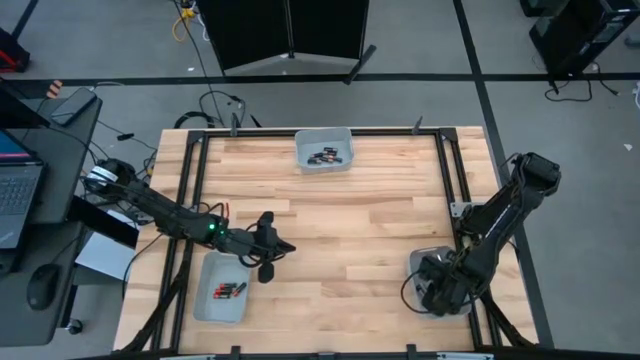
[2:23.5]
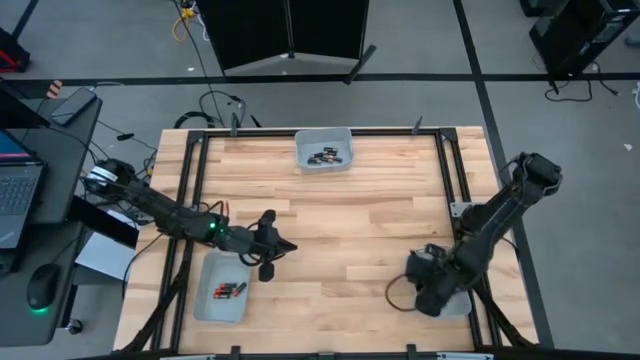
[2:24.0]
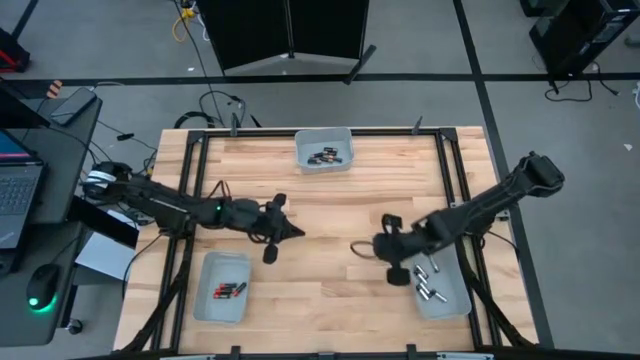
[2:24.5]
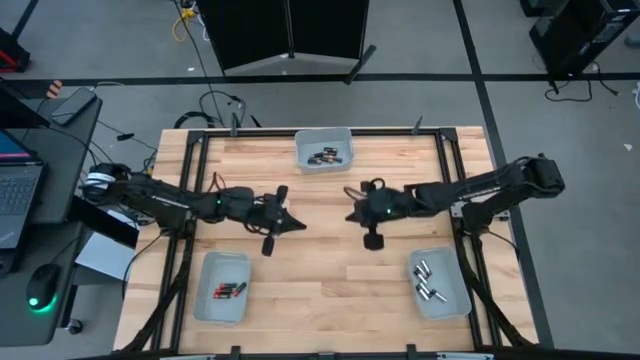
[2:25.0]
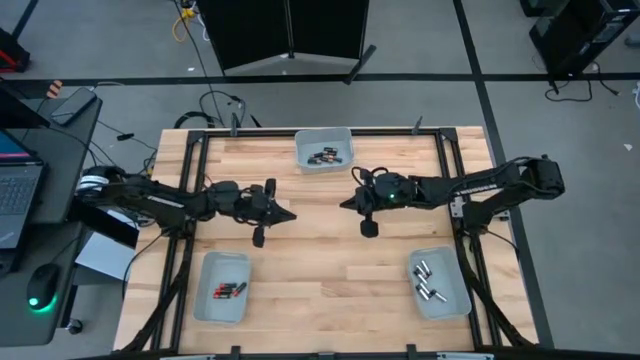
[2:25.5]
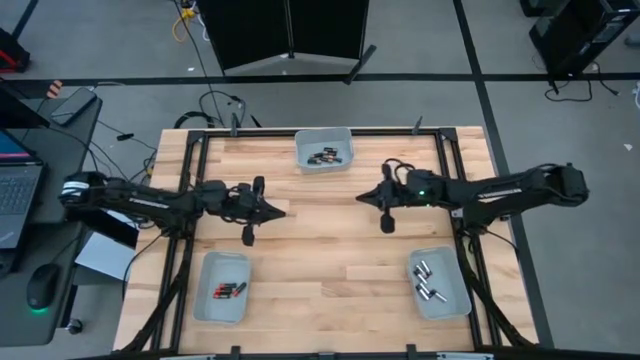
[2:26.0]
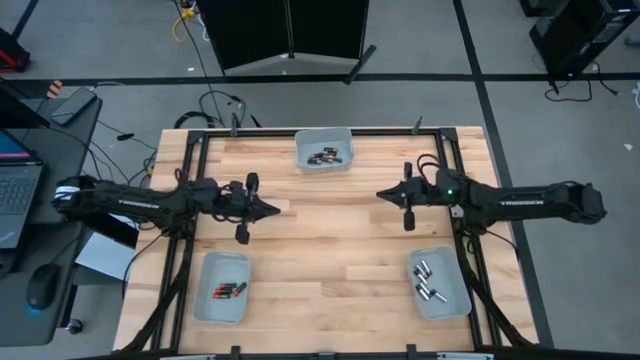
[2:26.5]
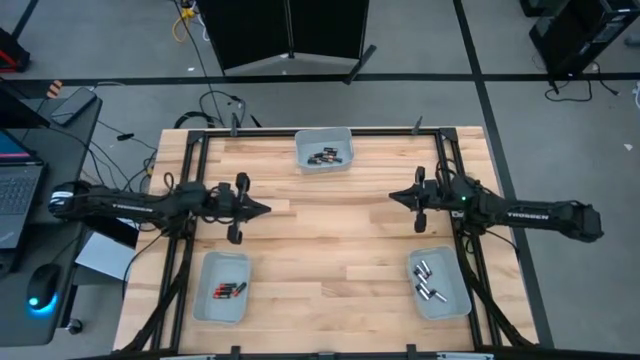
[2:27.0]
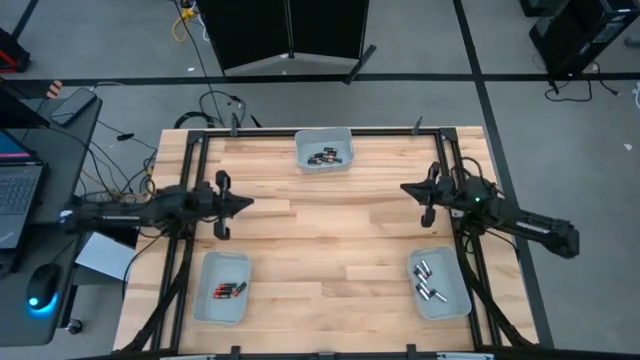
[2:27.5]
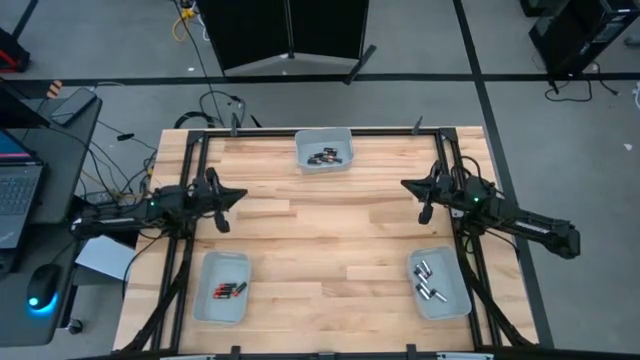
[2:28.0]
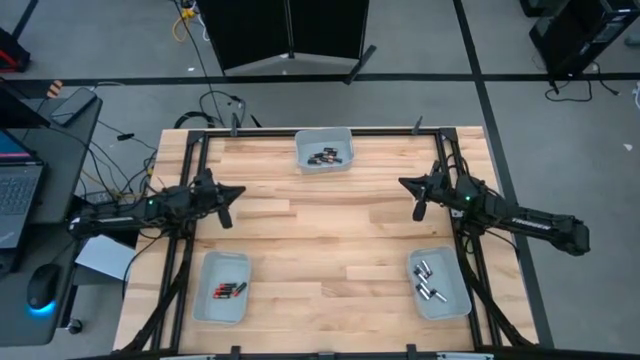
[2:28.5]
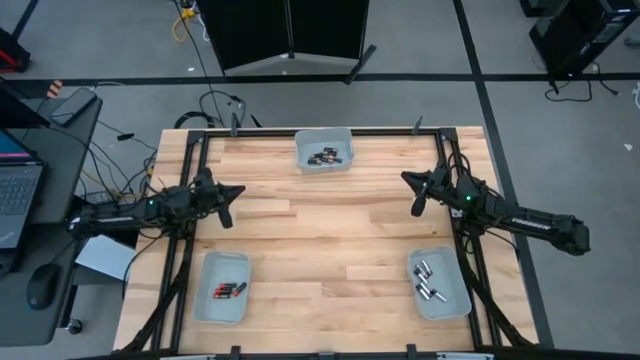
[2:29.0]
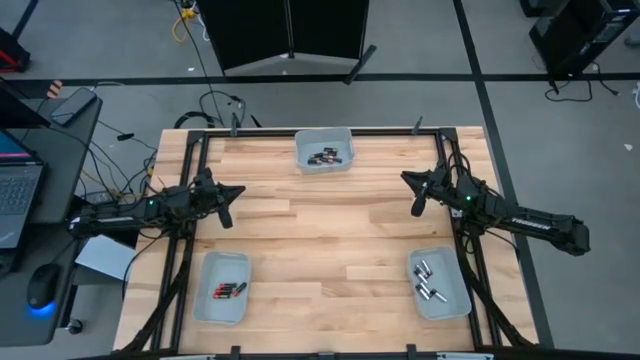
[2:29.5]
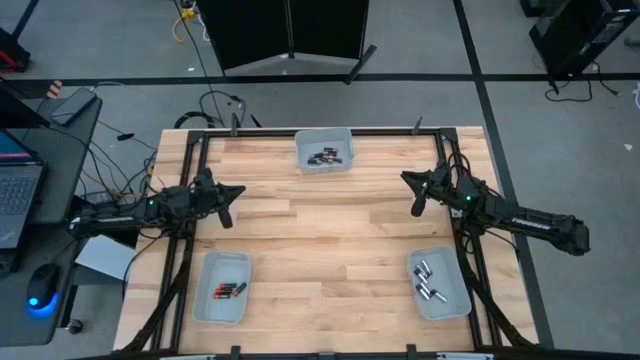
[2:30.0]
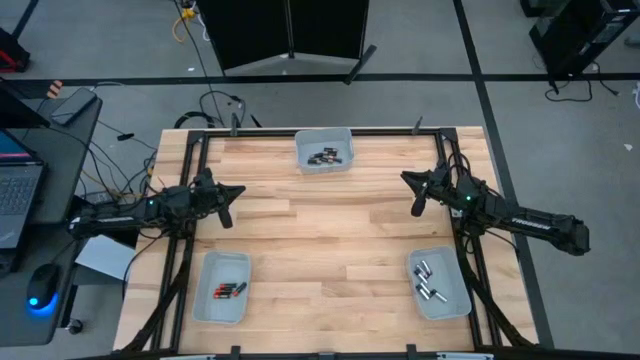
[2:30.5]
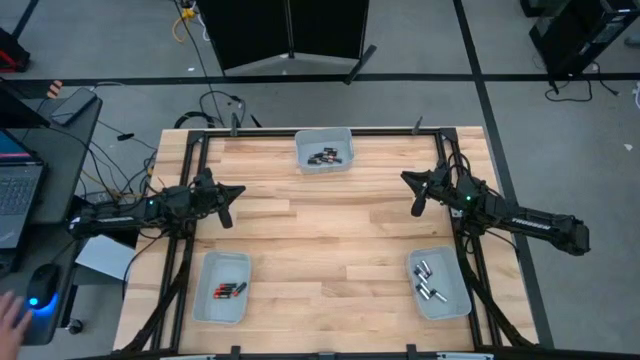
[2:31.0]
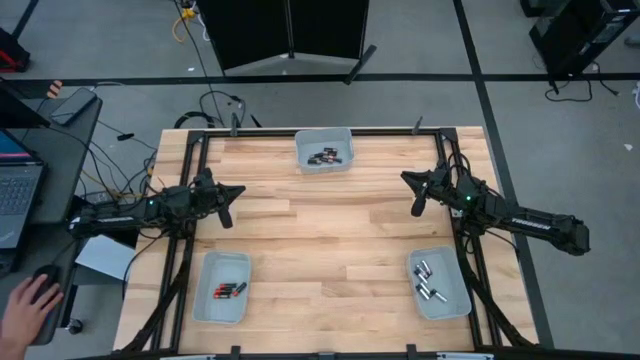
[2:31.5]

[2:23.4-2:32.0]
Task: Sort batteries
Return to Home Position

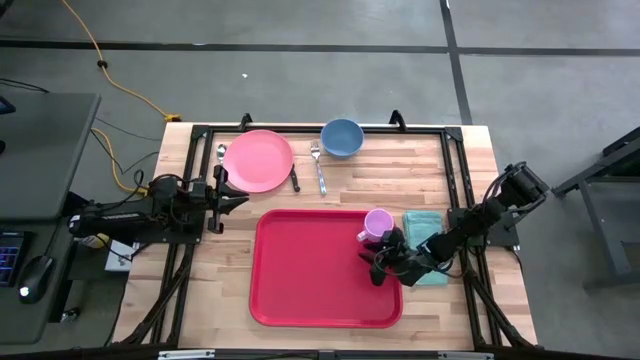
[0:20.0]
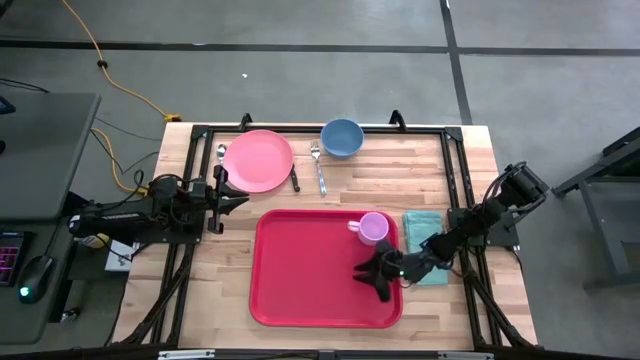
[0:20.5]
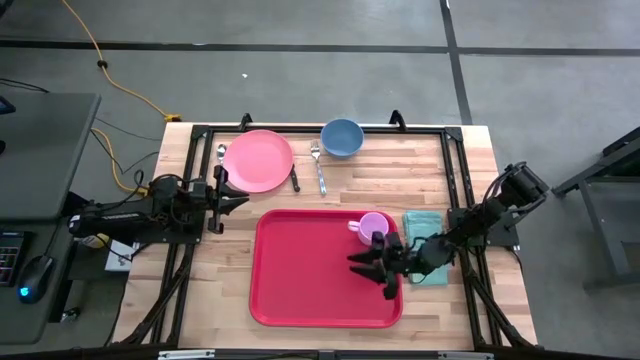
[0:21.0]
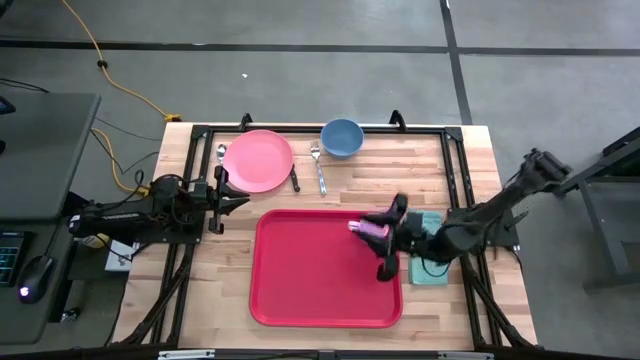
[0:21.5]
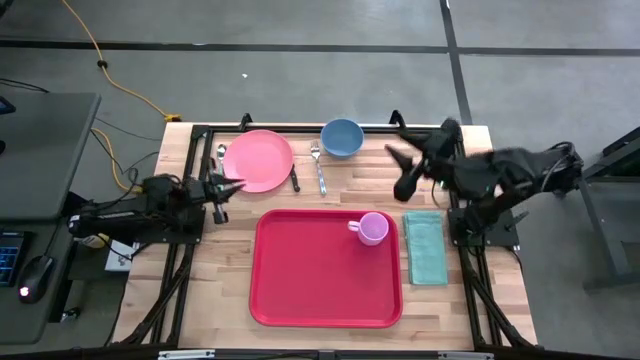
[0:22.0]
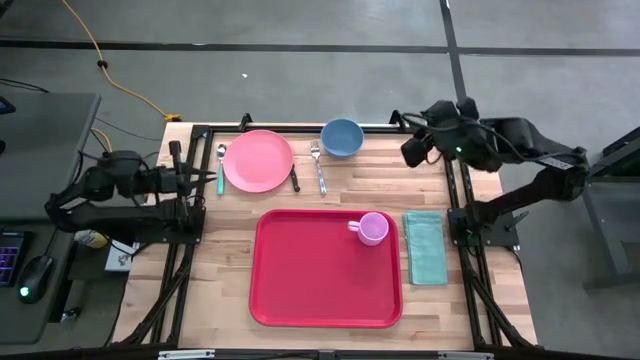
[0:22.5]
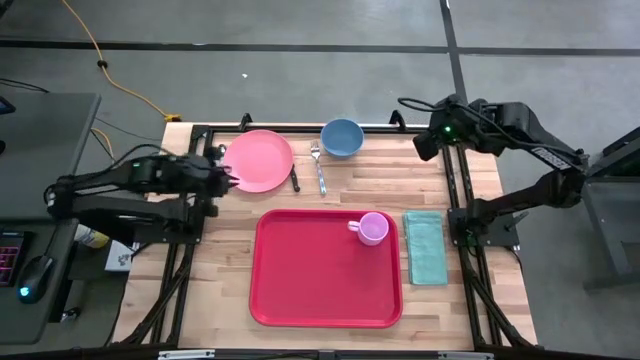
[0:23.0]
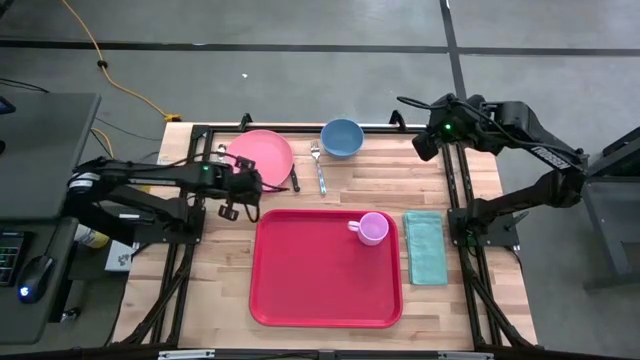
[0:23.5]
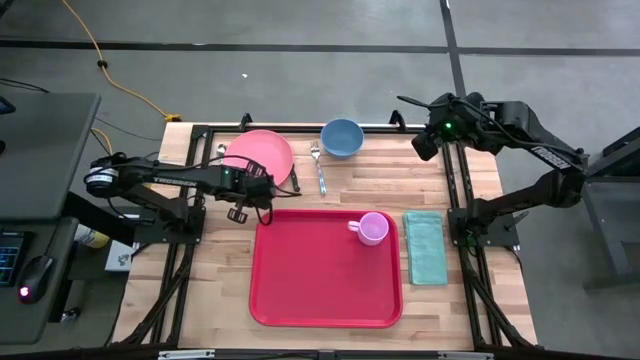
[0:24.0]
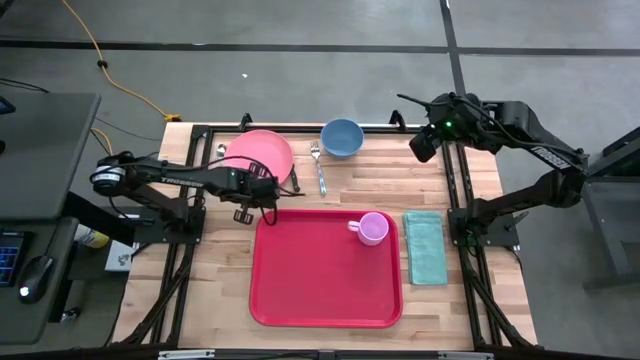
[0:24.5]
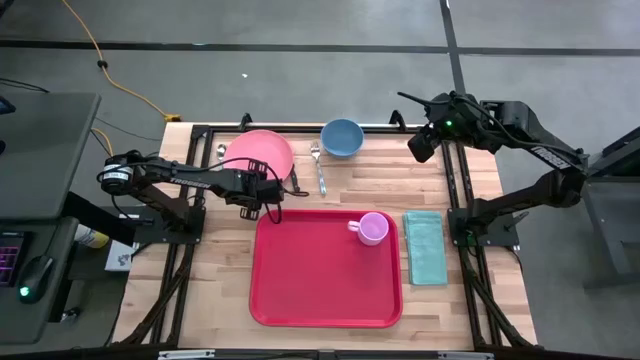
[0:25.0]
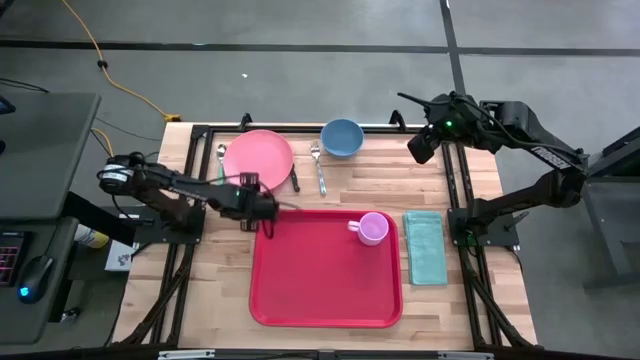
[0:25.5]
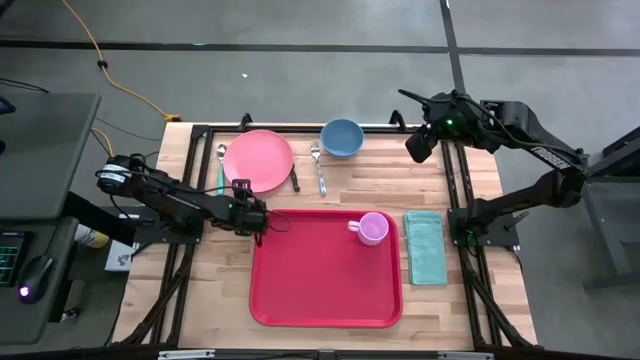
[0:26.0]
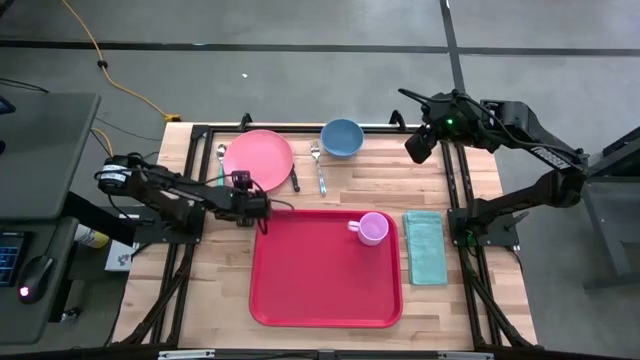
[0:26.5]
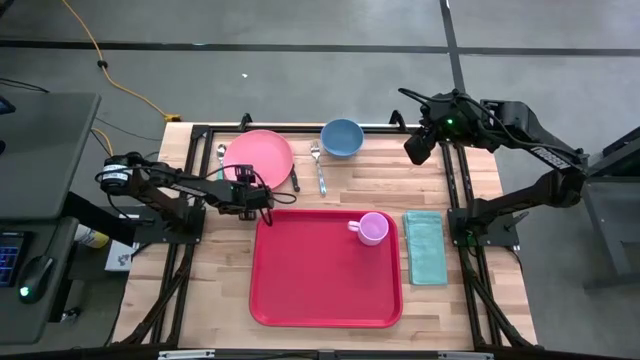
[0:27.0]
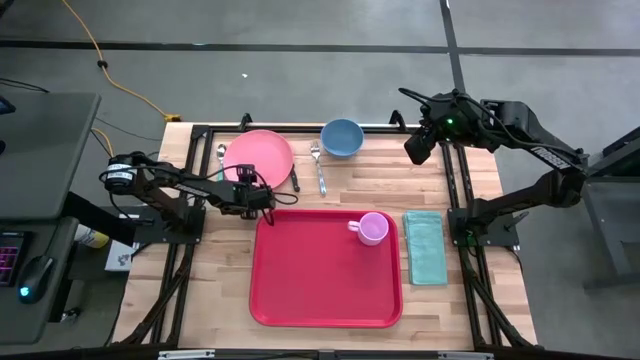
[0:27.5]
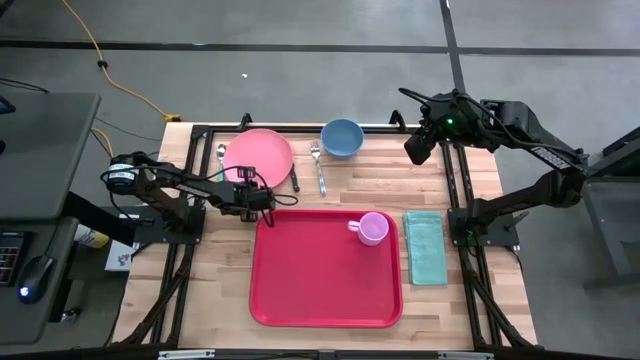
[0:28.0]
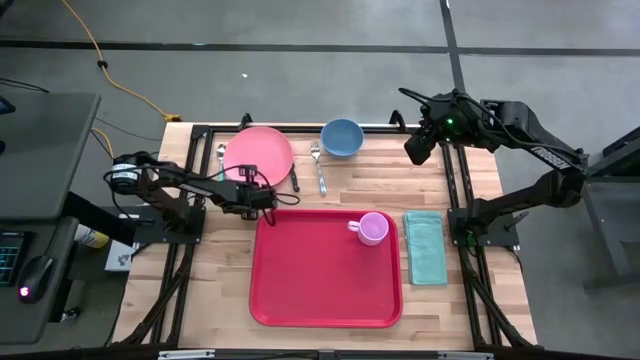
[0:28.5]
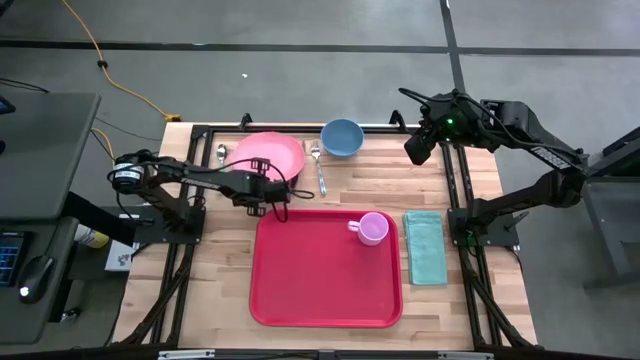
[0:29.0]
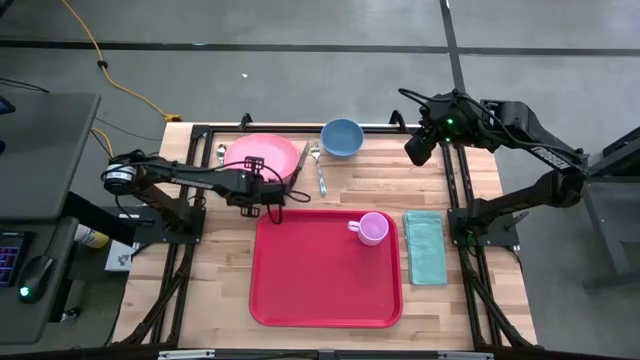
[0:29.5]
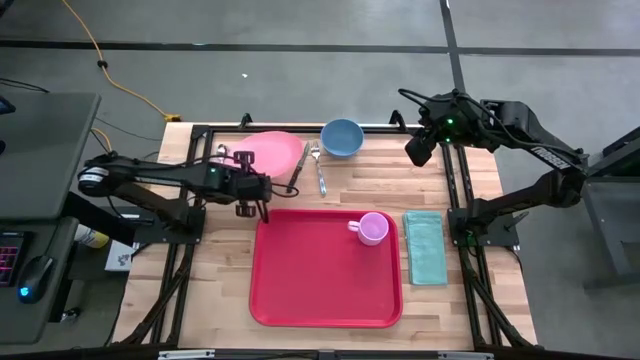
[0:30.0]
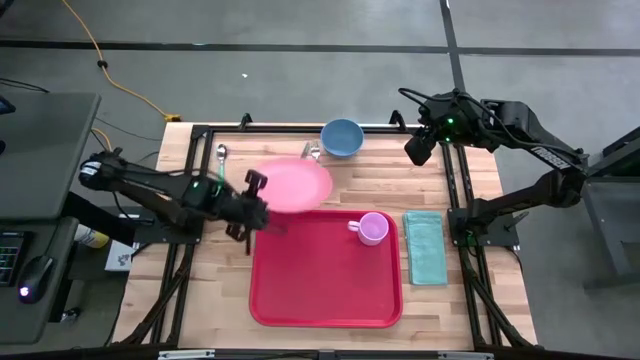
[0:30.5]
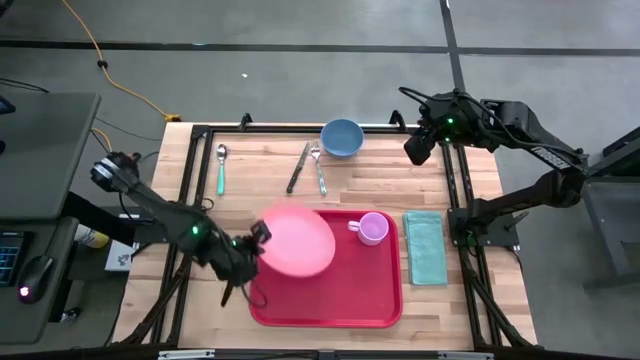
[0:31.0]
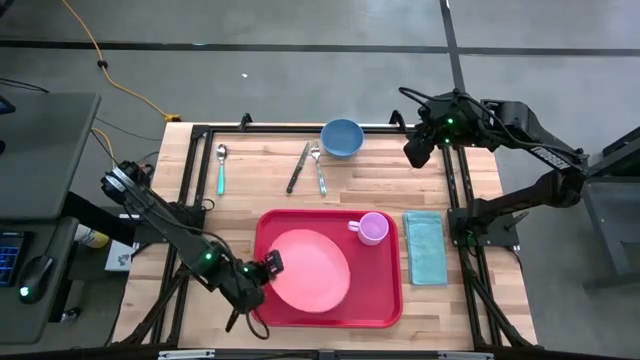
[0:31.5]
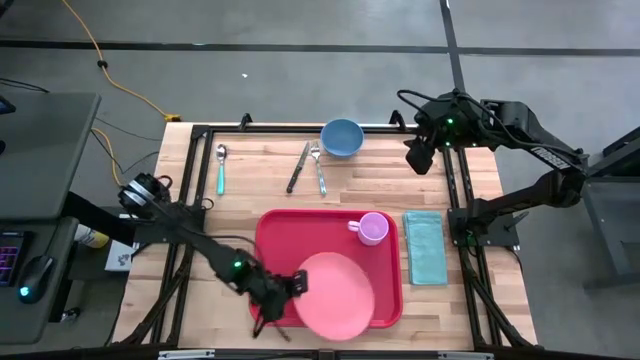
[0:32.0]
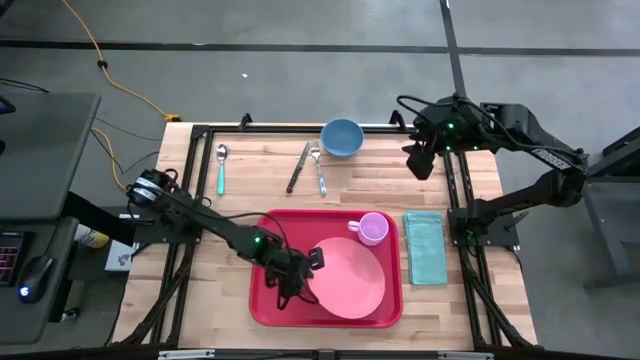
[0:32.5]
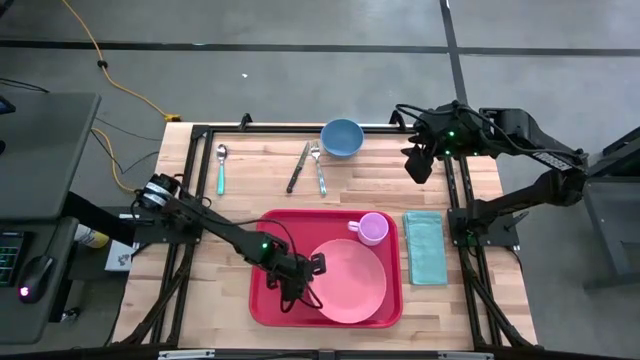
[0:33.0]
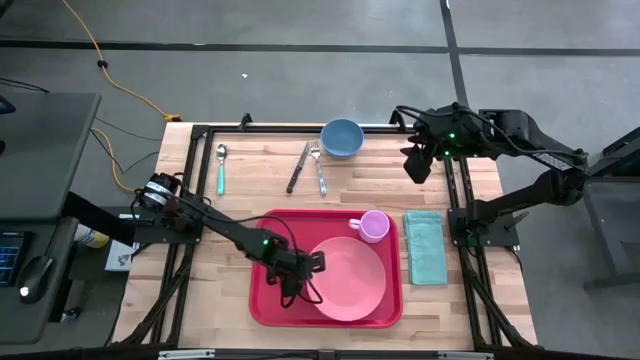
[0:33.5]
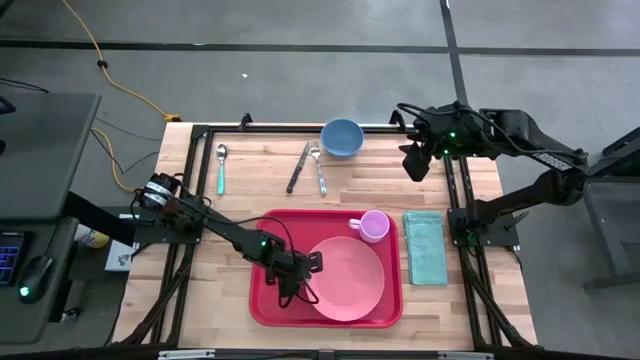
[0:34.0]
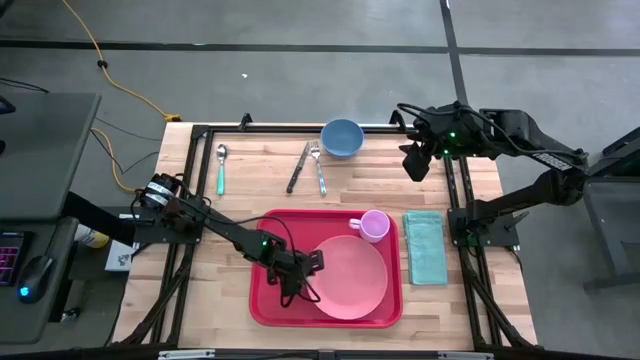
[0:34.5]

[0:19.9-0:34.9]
Task: Set up tray
Put the pink plate below the purple mug on the red tray
